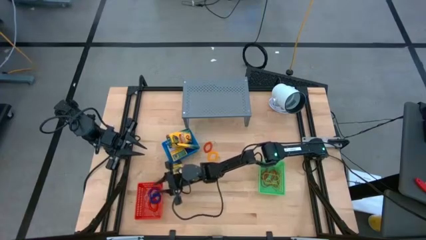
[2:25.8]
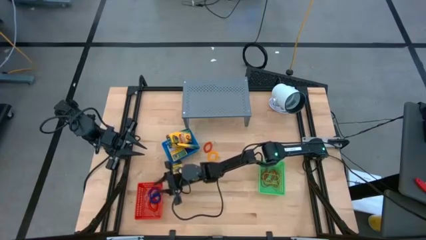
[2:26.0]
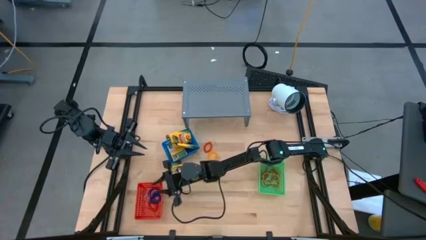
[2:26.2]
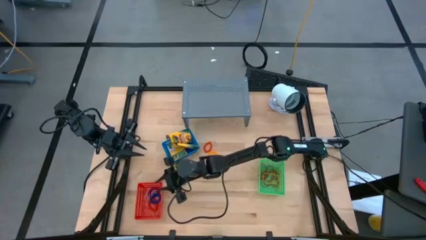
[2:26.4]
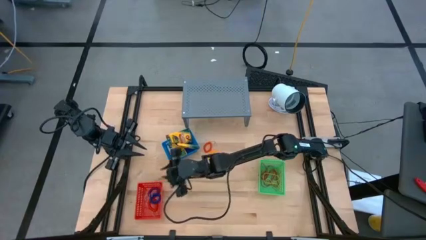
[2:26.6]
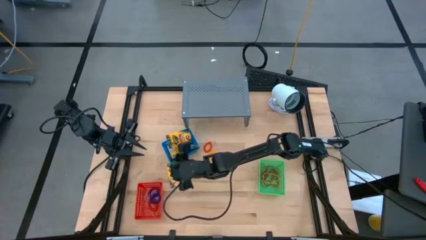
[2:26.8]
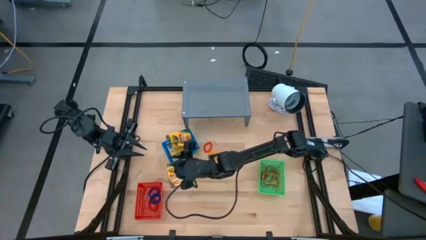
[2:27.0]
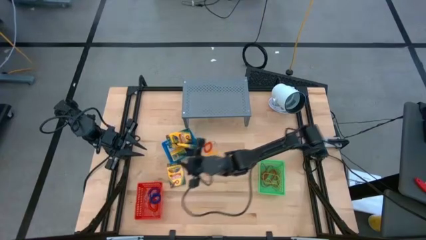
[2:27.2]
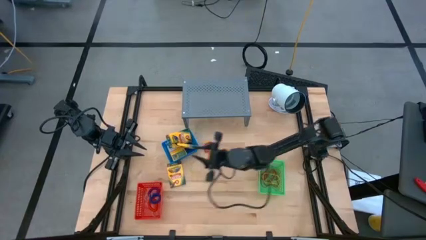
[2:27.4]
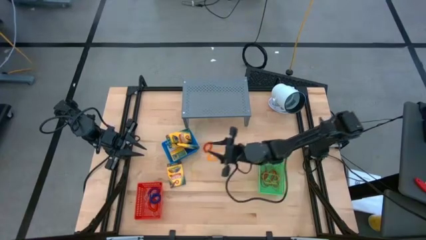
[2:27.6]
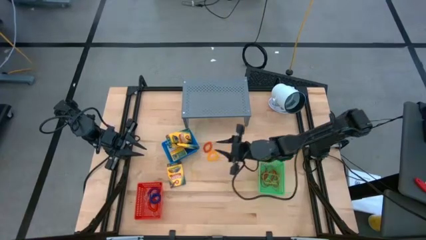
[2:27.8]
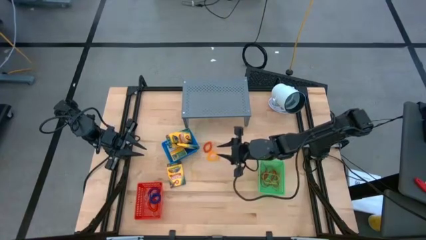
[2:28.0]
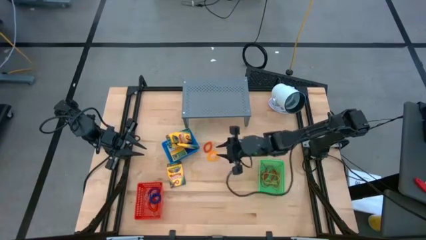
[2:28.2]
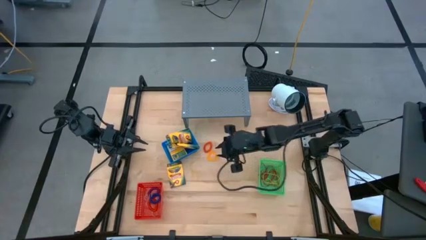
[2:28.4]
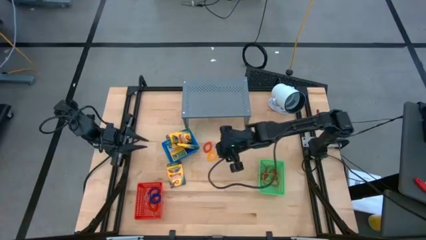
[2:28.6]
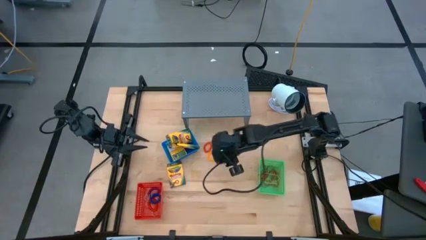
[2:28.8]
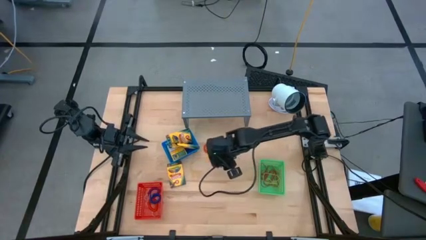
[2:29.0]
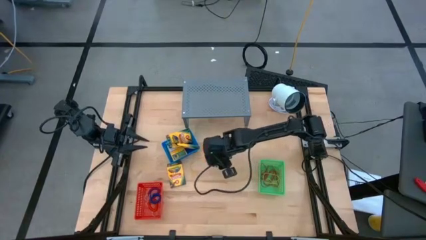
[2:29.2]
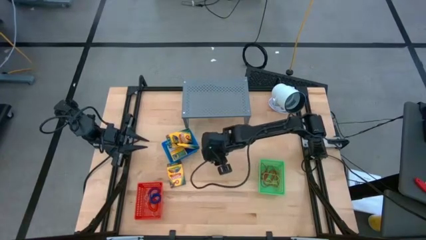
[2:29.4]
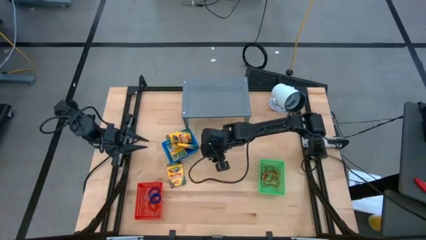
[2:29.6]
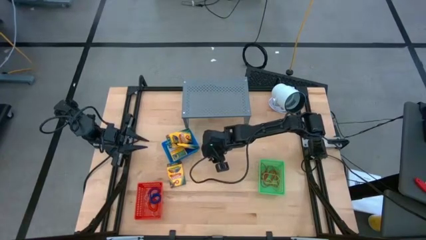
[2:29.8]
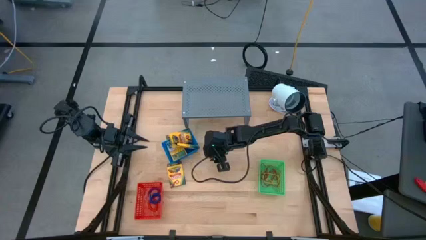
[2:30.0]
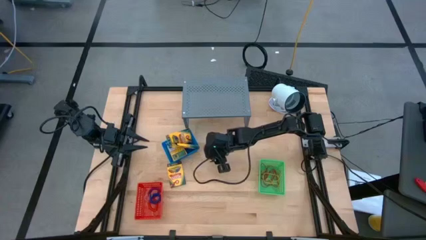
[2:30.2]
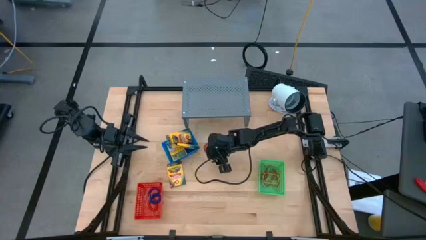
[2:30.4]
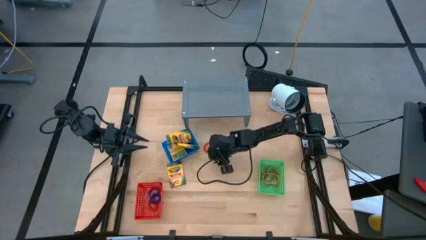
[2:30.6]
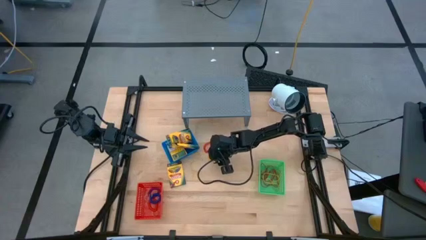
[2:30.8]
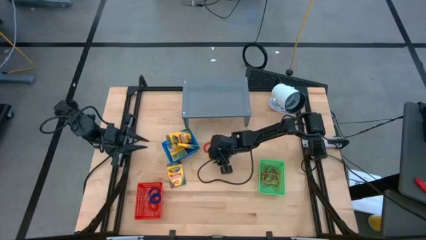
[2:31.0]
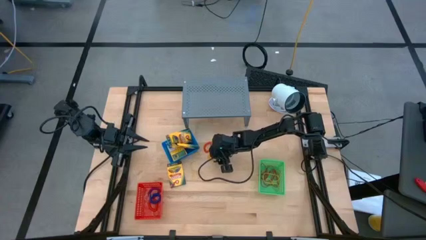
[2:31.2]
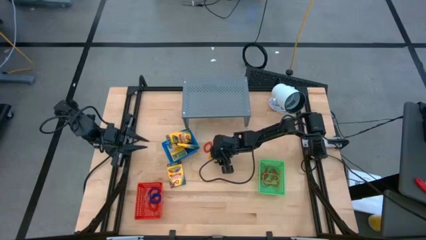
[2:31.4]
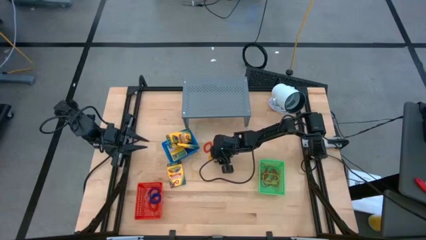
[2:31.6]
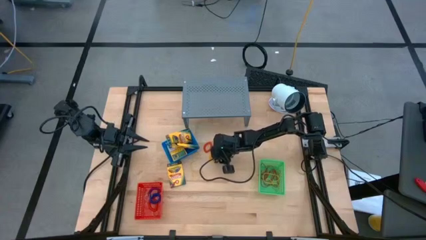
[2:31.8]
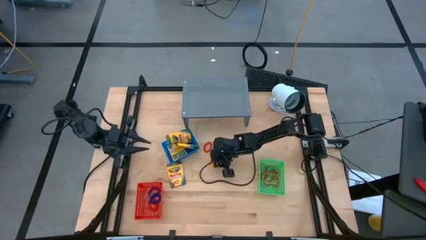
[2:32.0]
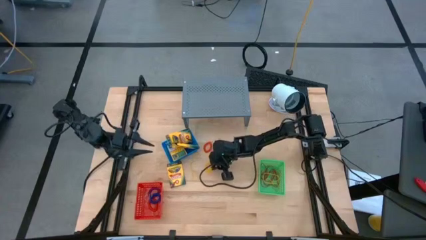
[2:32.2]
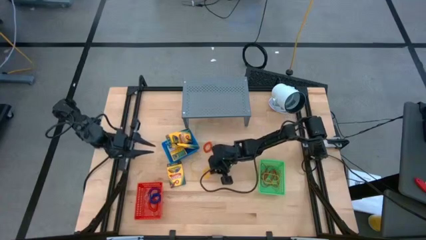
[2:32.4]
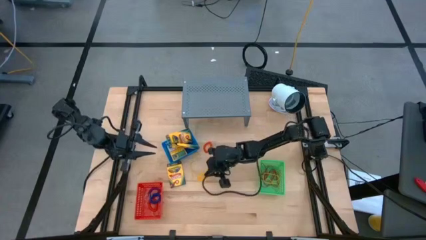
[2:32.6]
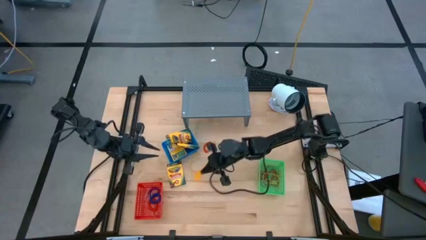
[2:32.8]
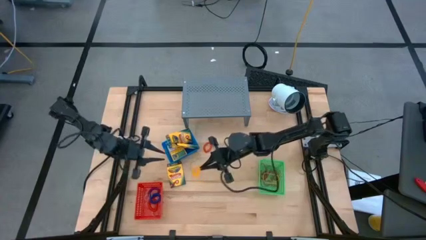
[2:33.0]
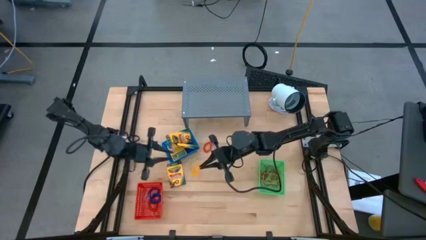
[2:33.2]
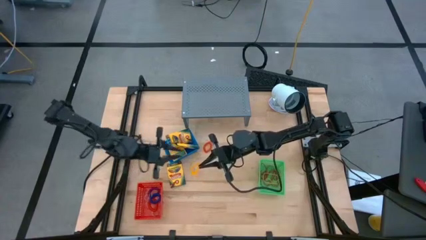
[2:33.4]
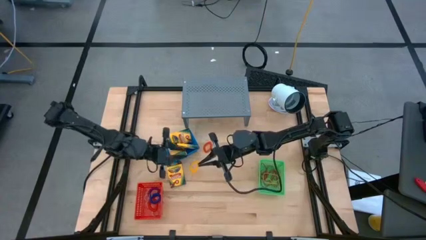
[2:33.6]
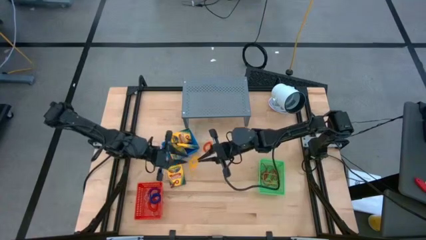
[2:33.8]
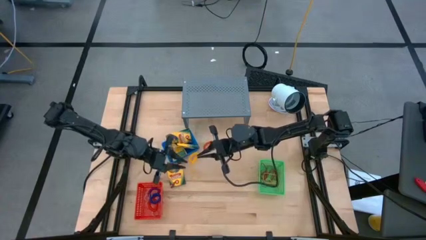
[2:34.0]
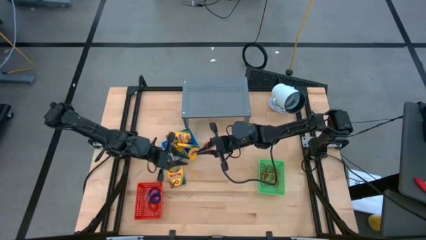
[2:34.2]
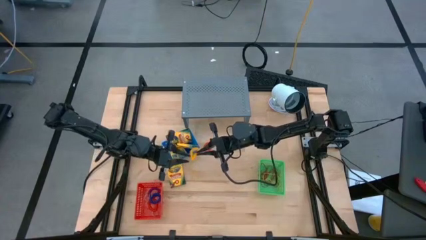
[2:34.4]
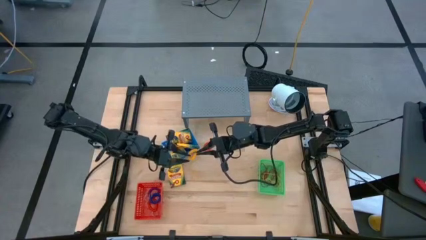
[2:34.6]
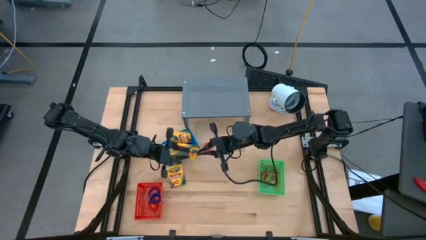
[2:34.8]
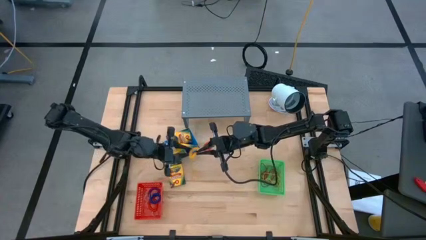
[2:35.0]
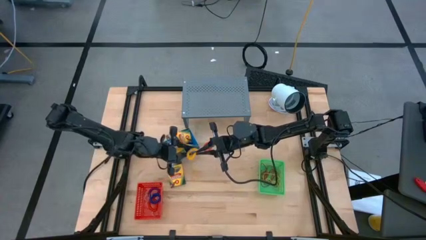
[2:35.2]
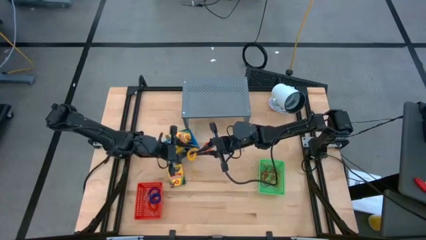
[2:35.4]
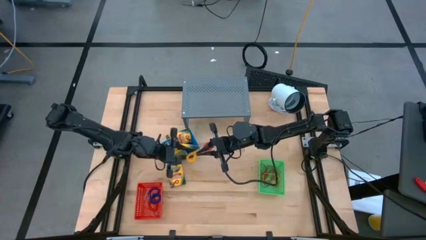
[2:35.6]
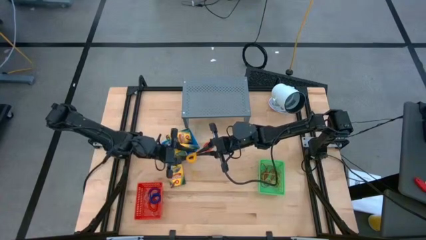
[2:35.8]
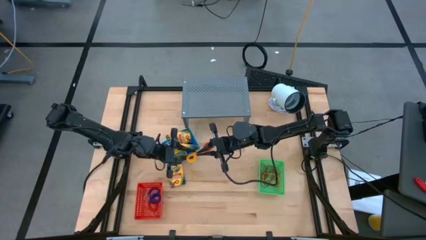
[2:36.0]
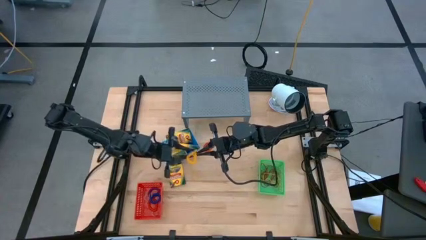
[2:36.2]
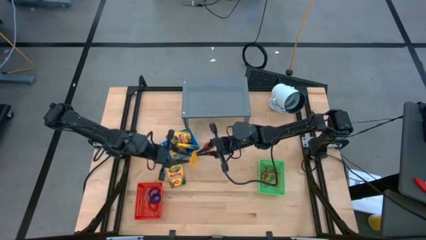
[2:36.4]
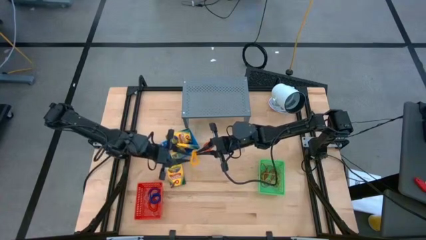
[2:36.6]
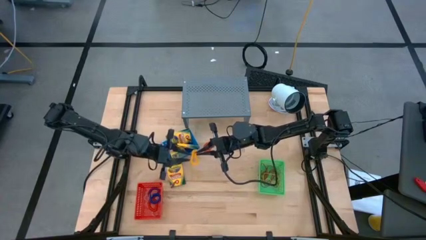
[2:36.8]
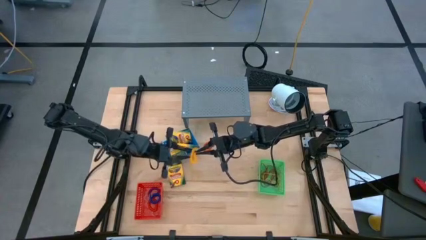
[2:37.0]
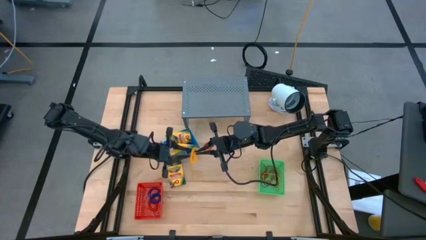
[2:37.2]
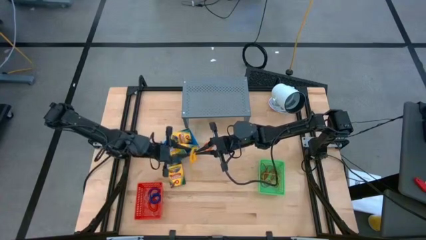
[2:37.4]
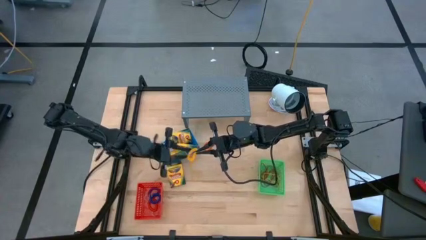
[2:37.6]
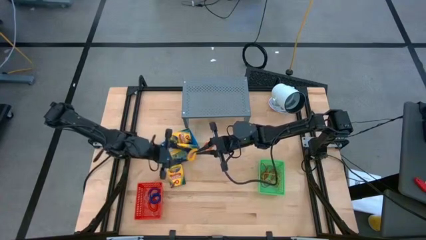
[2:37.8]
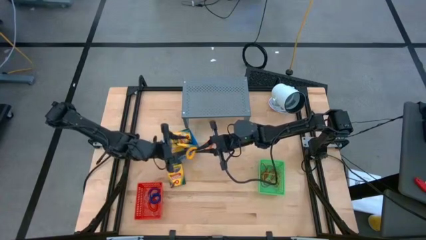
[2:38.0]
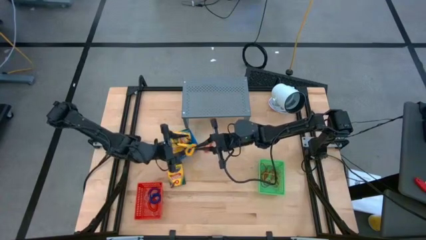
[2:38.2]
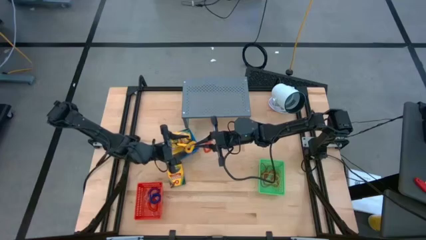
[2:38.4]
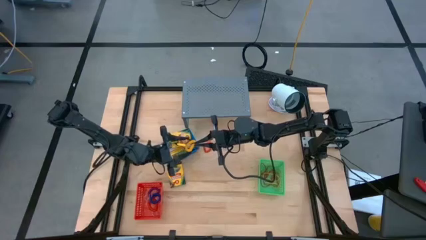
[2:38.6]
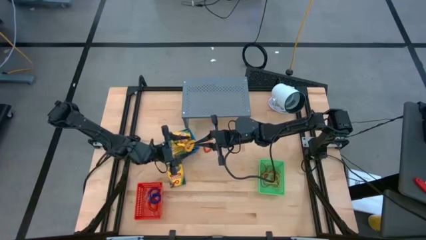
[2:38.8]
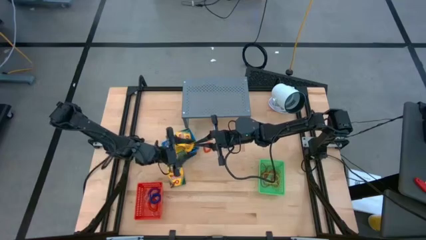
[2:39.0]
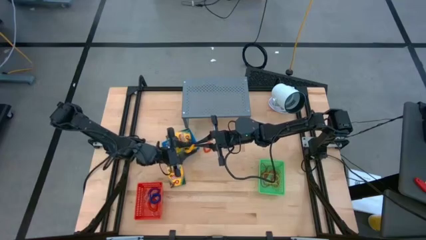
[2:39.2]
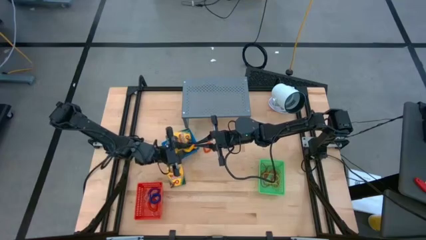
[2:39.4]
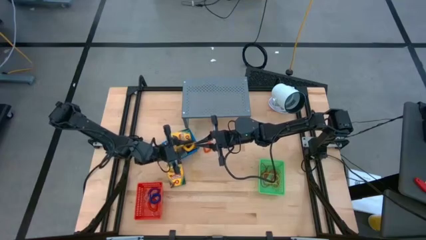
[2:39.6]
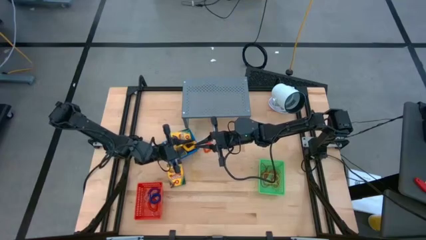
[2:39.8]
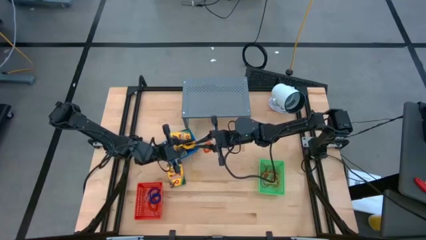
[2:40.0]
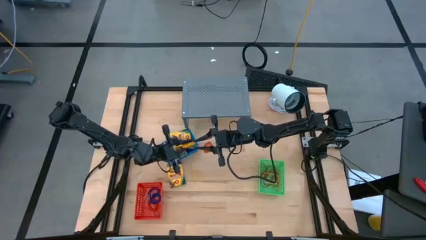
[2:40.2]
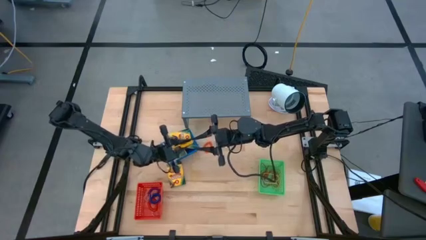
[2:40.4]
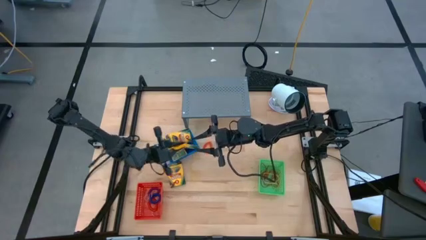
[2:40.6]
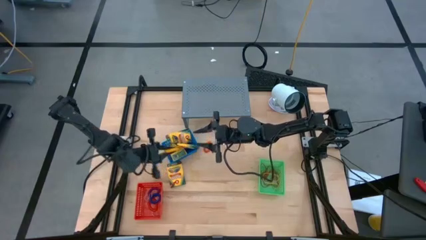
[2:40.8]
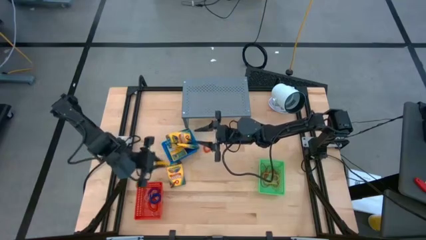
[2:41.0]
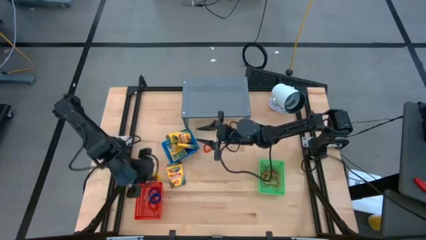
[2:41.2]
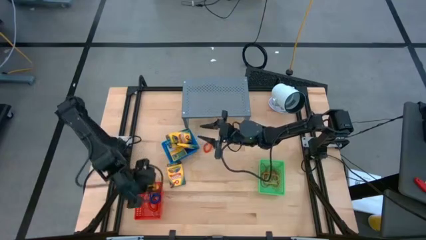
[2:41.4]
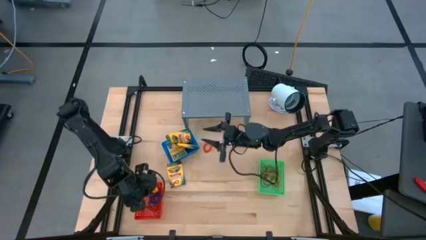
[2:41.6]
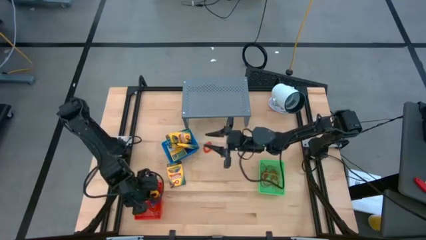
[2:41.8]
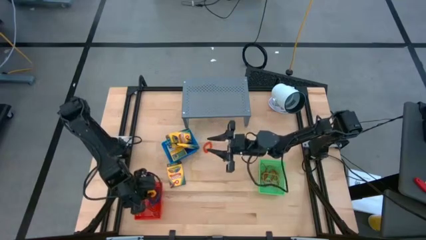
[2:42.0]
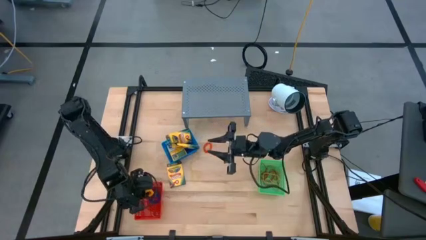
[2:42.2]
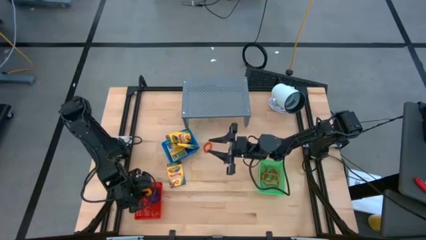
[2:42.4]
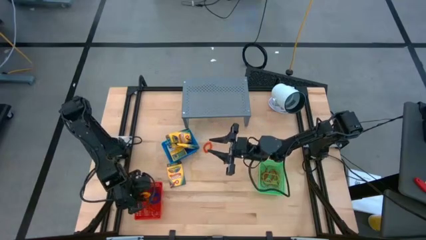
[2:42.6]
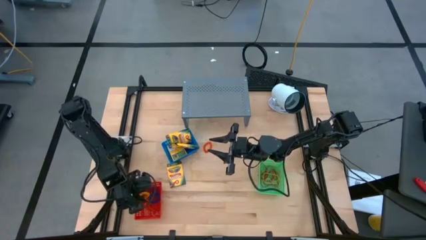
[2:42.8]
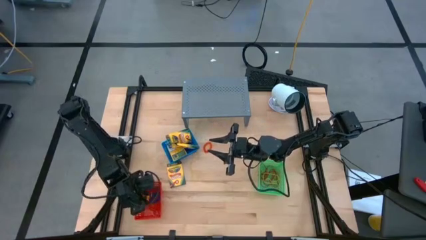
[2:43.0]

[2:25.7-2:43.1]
Task: Pick & Place Office Desk Supplies
Put the yellow spiral keychain into the red bin
